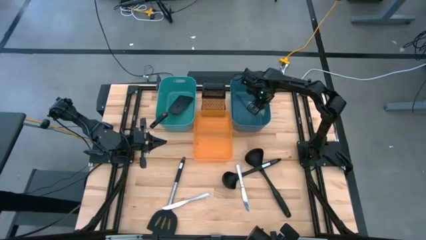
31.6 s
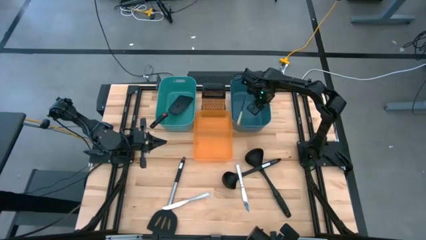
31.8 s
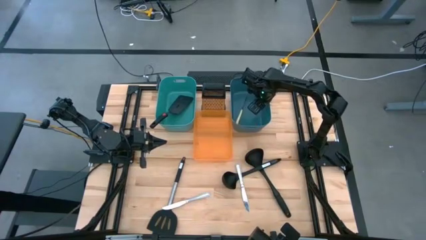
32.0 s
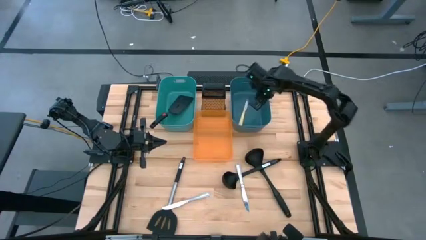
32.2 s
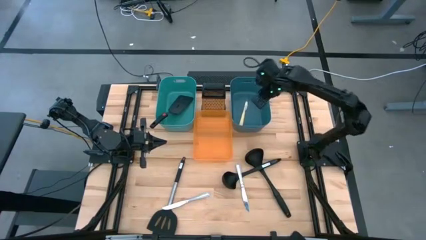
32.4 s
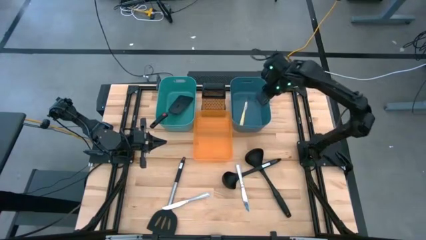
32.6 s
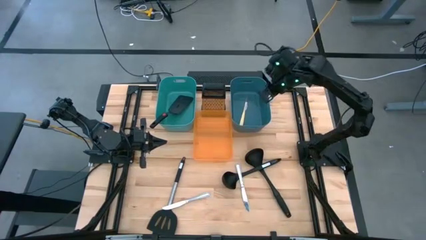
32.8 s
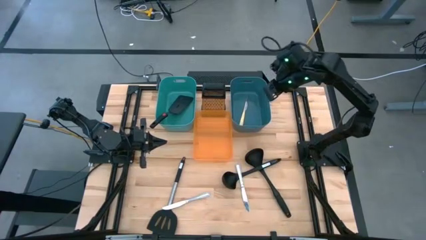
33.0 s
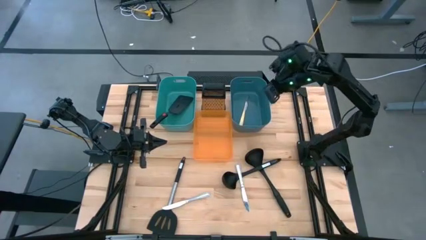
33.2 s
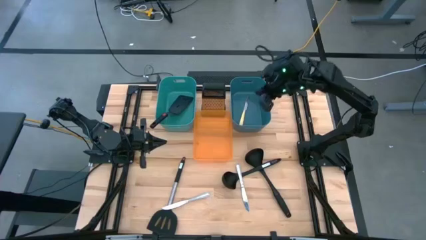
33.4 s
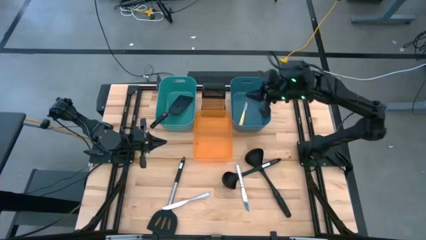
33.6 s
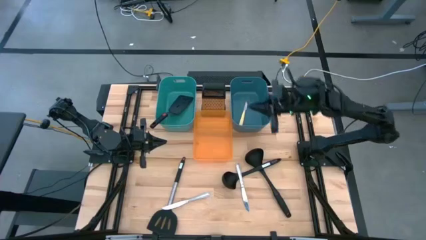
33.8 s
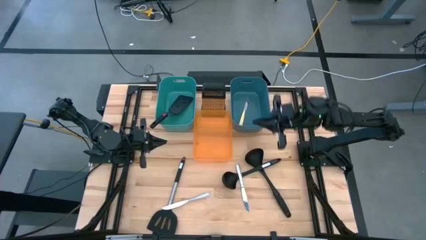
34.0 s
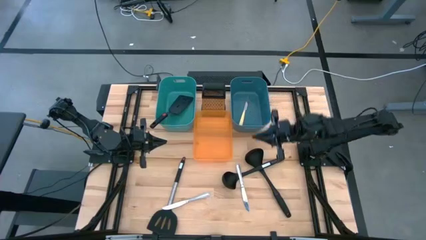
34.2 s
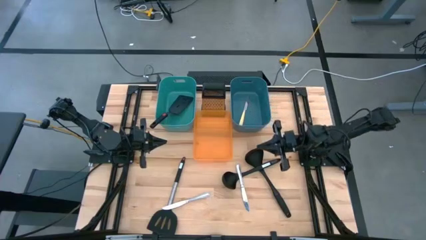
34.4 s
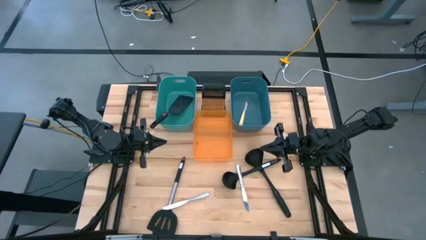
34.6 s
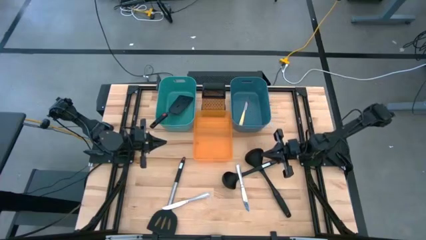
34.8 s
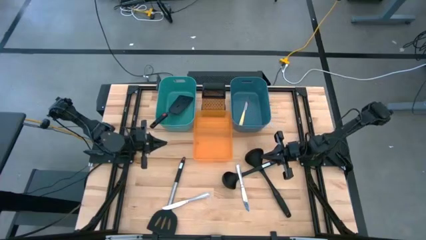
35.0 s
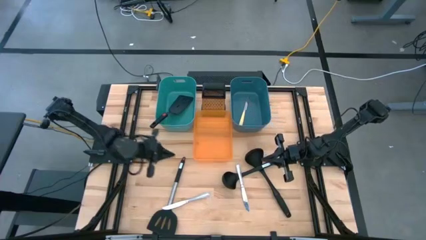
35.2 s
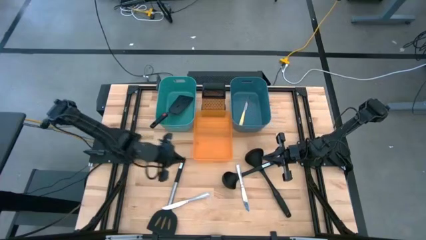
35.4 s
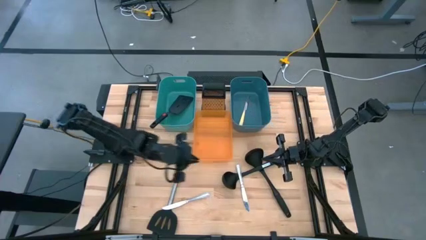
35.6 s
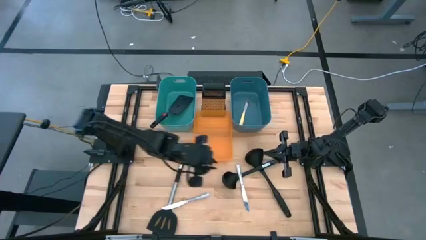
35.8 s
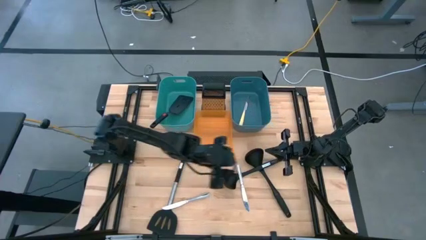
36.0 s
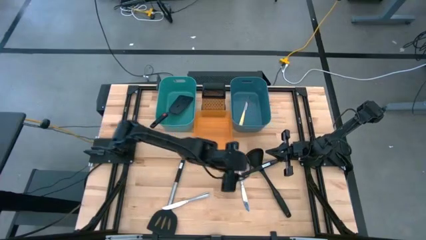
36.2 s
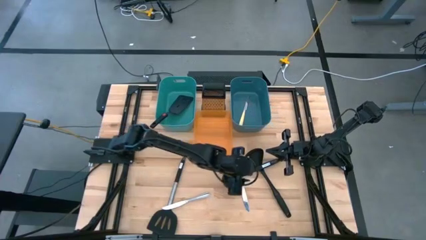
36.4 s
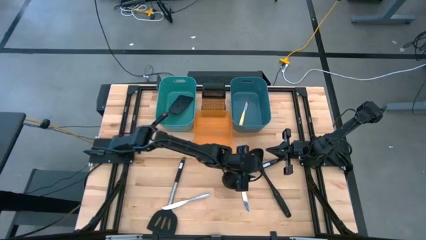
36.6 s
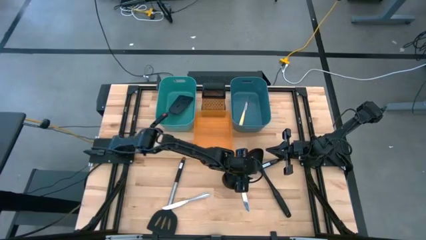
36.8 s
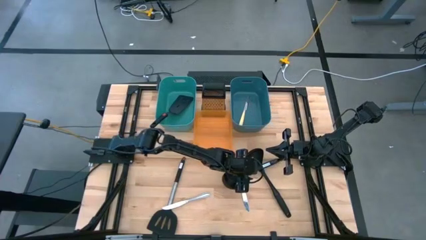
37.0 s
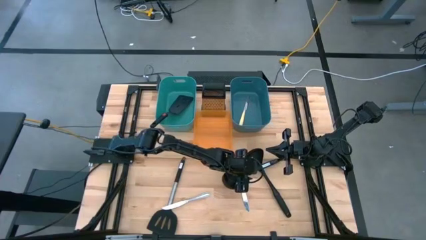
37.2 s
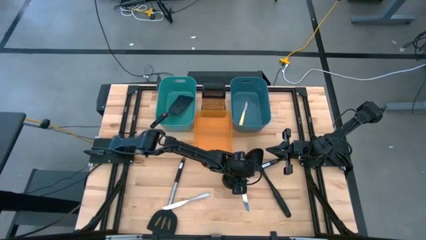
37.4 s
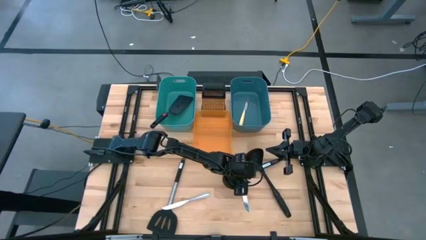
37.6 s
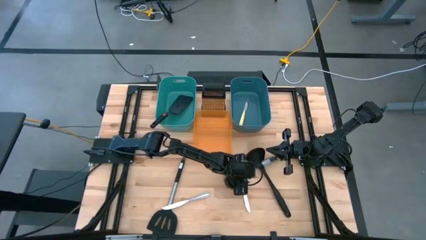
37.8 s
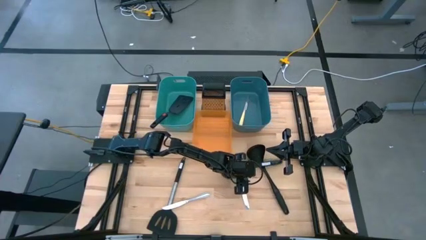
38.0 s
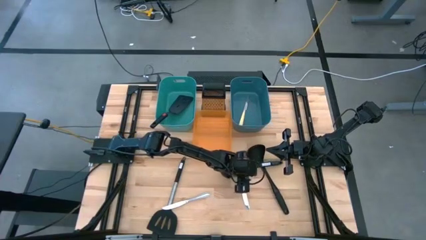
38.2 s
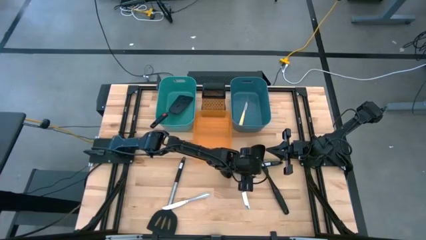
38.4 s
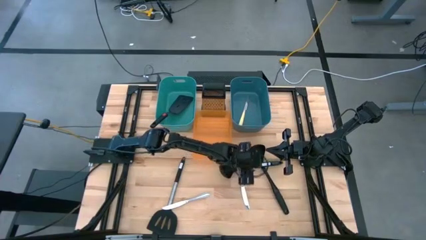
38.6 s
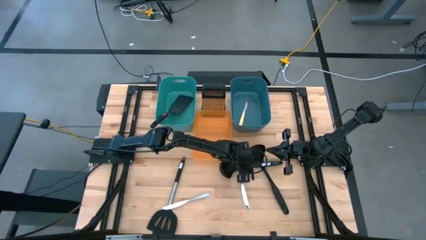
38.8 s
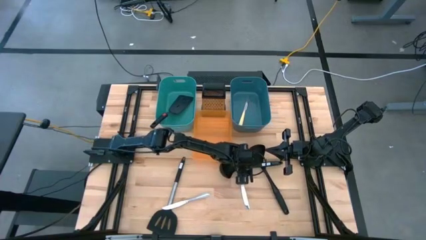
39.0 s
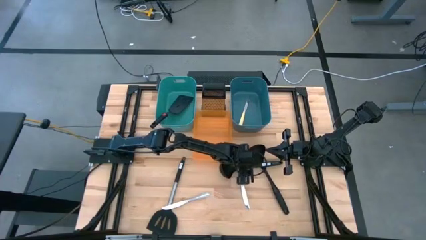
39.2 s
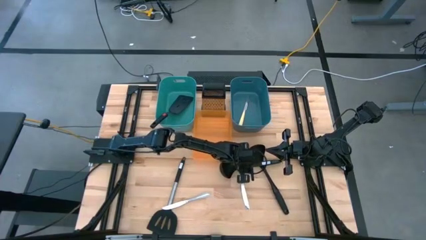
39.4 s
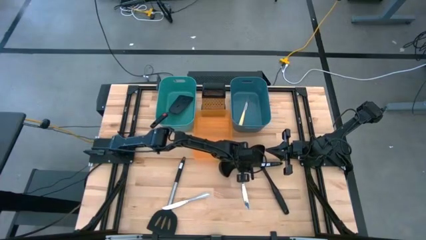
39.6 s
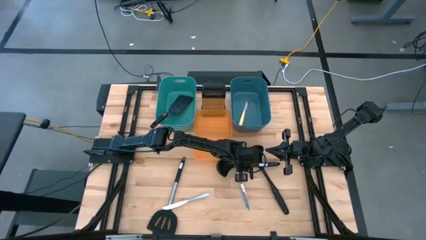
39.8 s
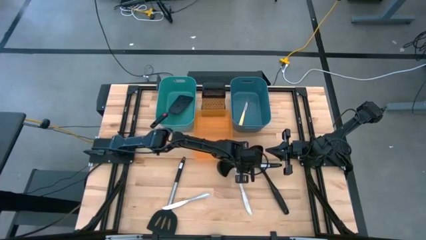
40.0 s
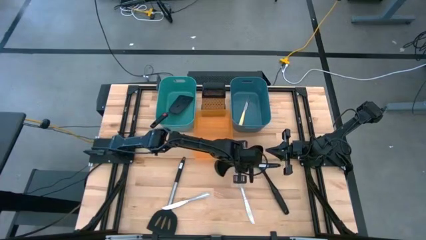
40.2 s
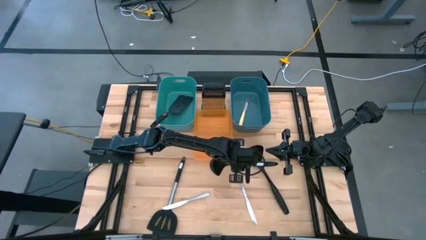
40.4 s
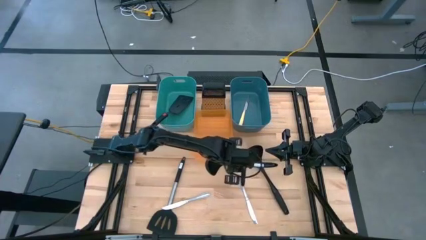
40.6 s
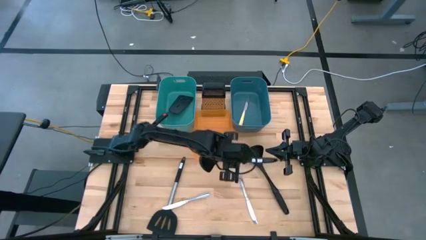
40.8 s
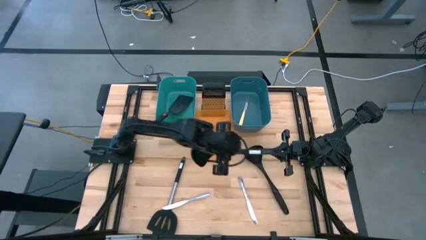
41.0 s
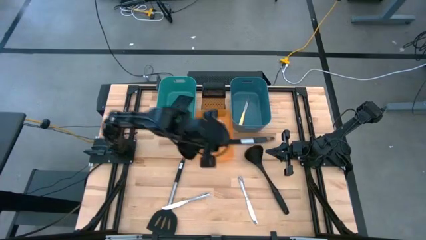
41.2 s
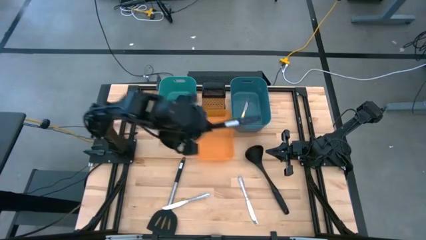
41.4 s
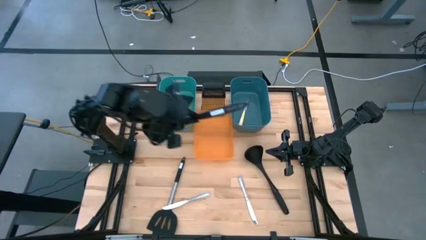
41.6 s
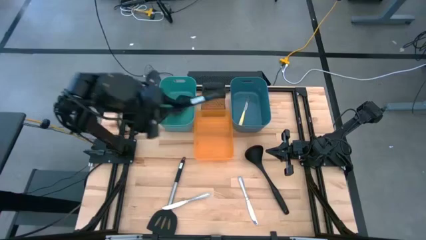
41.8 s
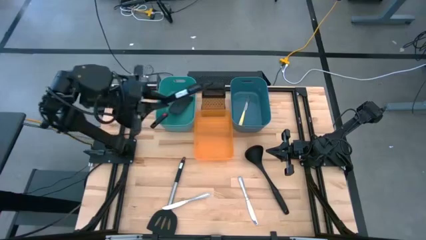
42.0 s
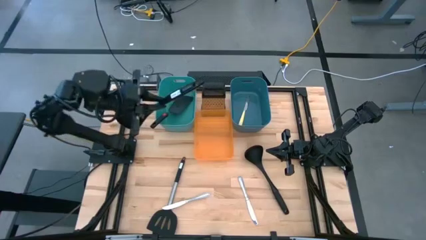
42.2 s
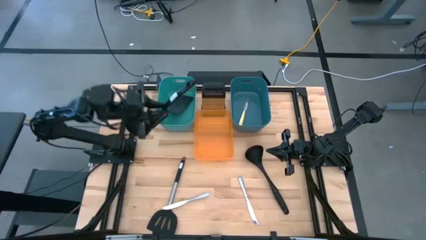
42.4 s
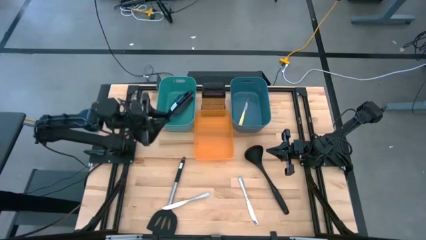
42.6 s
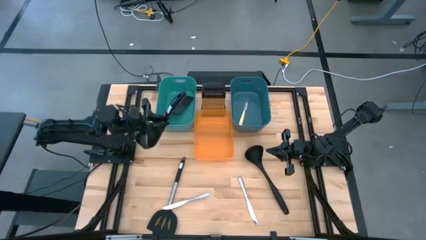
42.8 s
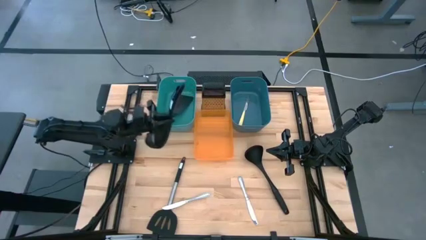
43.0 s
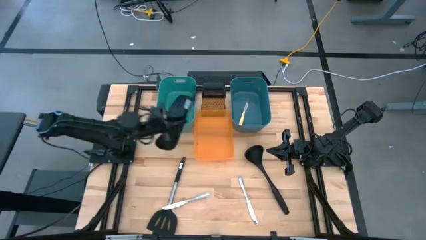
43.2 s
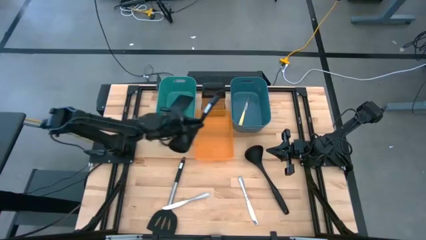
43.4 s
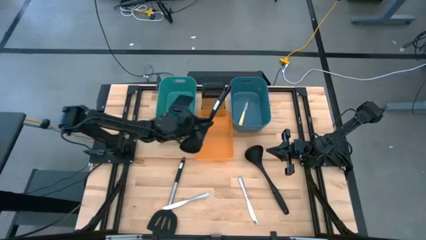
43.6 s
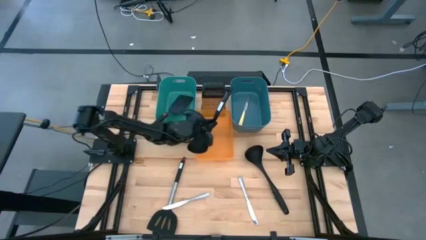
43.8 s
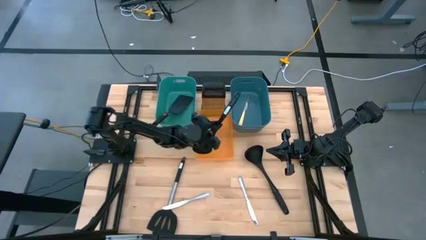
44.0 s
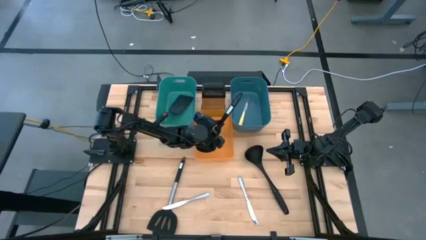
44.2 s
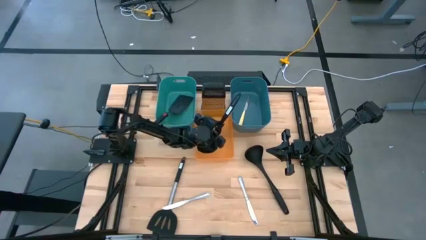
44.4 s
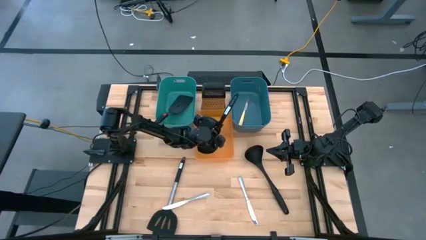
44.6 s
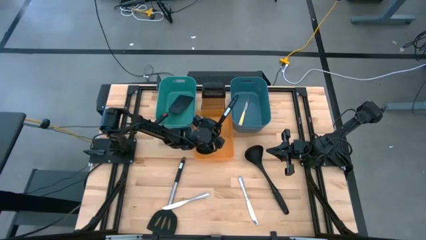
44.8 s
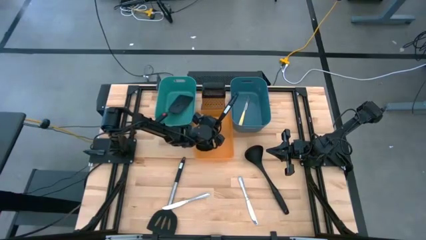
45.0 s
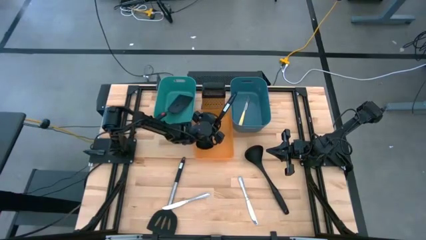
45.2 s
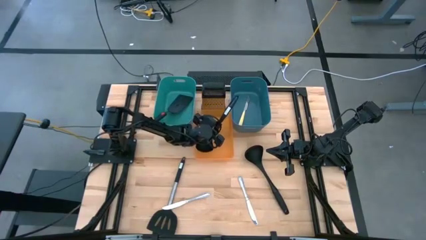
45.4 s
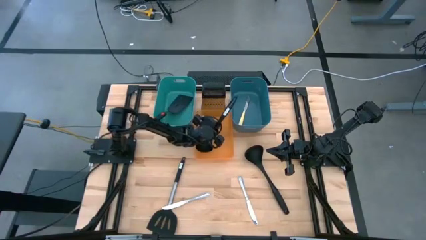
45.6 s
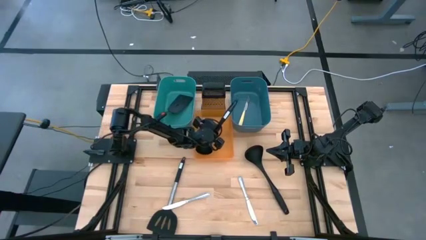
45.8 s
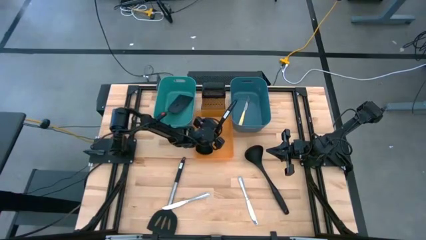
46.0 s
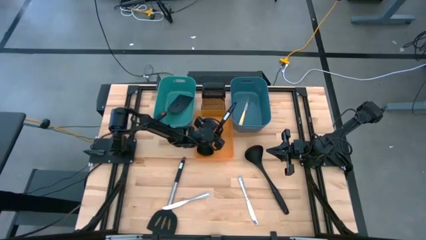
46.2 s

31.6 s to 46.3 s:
Task: Pick & Place Kitchen Items
Put the left black ladle into the orange bin

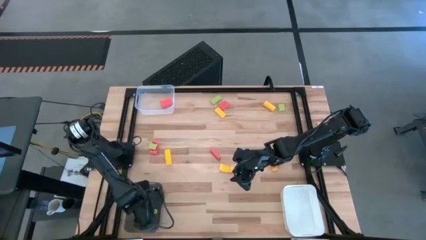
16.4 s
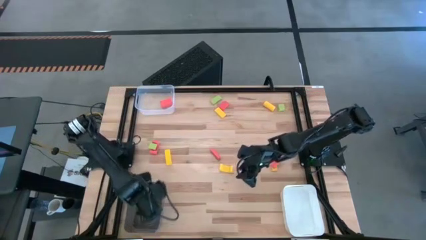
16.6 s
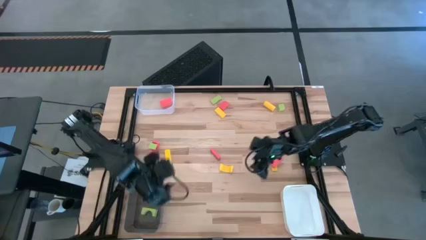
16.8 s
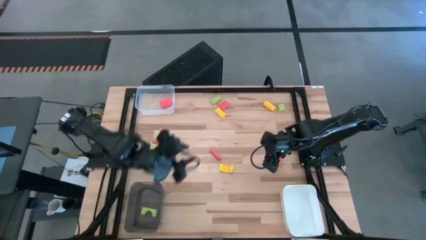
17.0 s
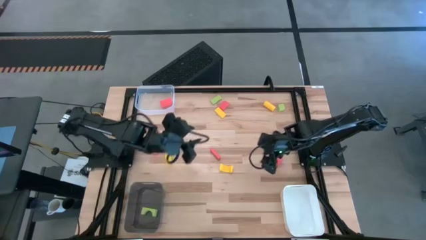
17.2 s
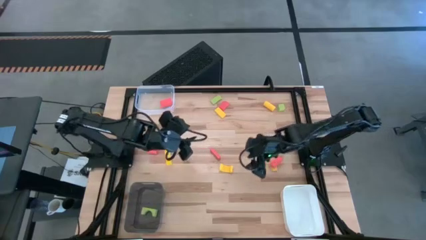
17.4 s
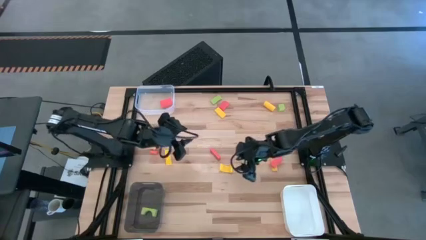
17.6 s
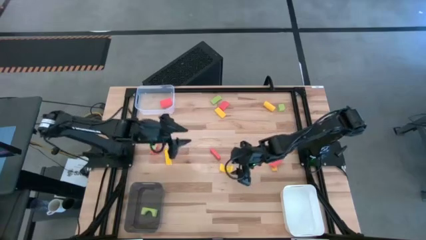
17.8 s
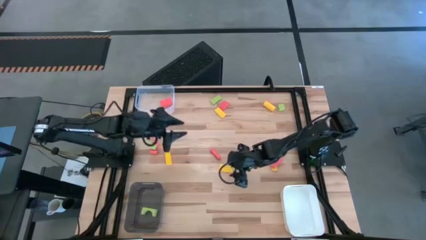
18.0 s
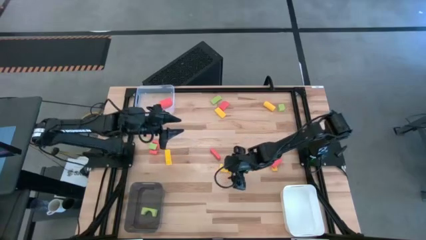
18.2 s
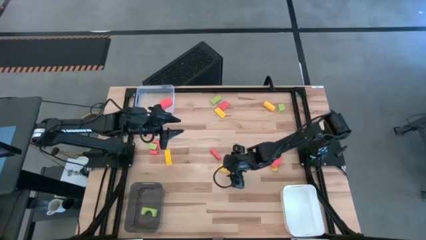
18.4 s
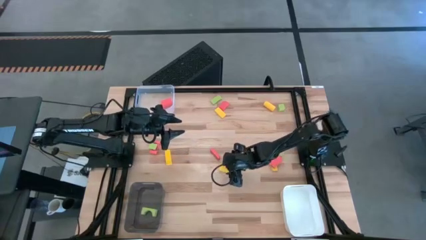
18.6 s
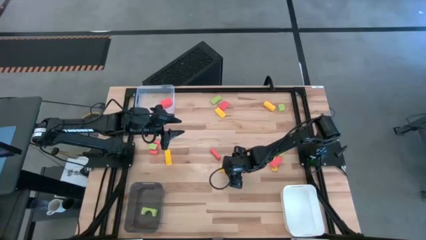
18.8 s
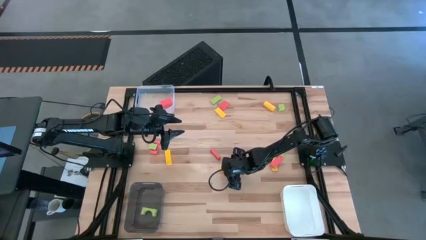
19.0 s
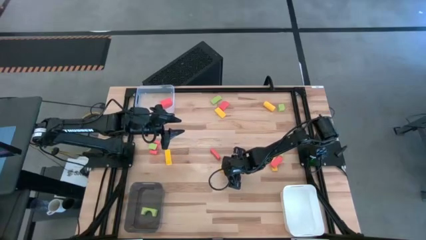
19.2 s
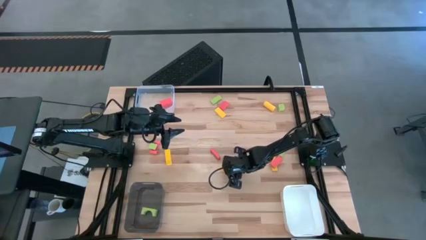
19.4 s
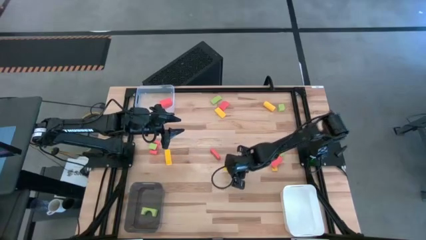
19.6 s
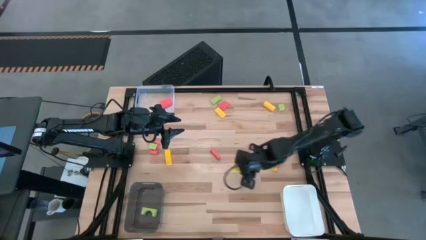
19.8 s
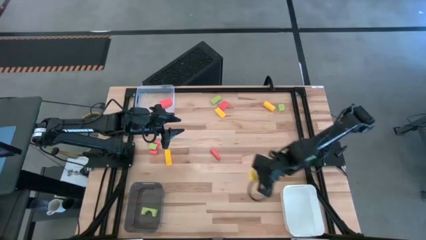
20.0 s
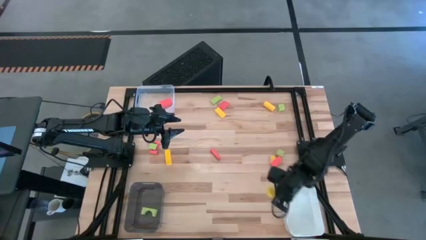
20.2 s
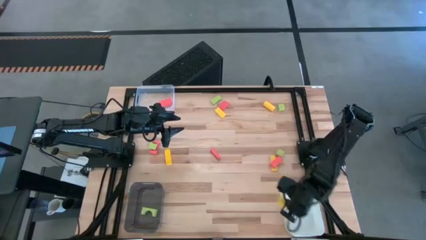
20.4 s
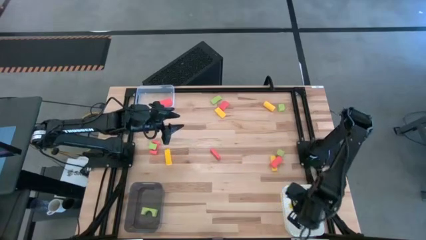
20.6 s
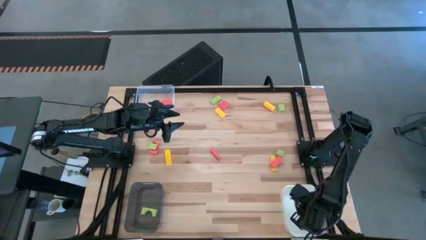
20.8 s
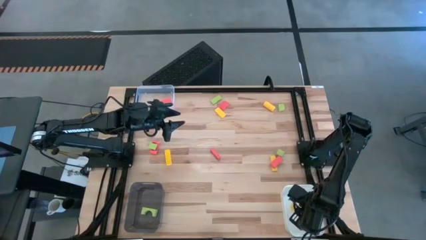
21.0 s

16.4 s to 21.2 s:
Task: Sort & place blocks by color
Put the yellow block into the white bin
